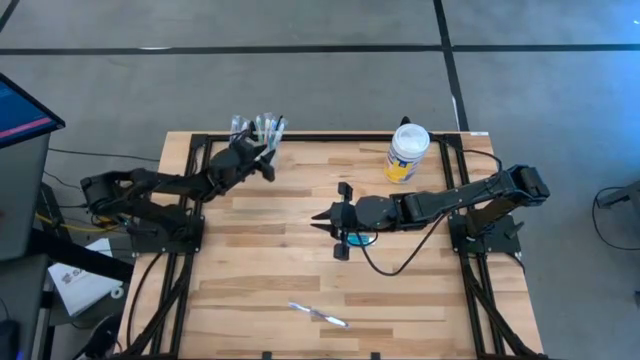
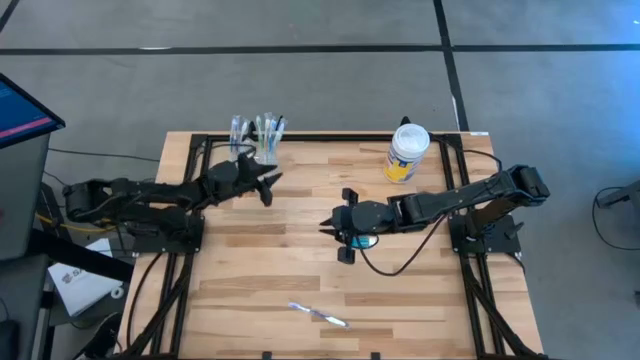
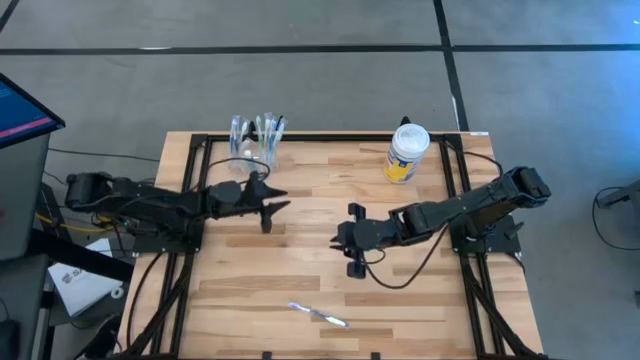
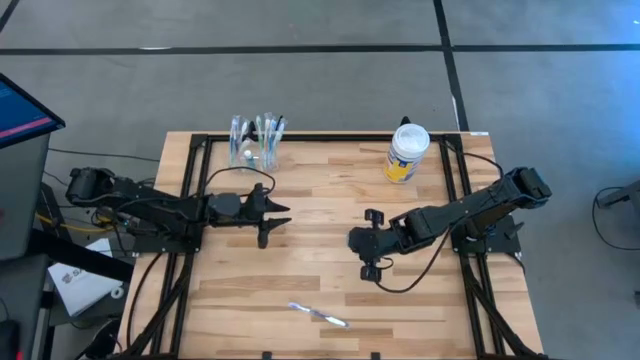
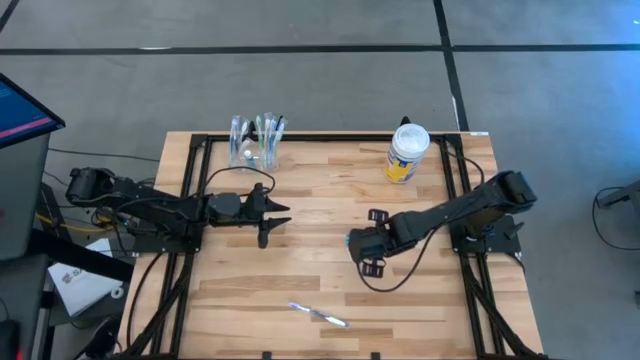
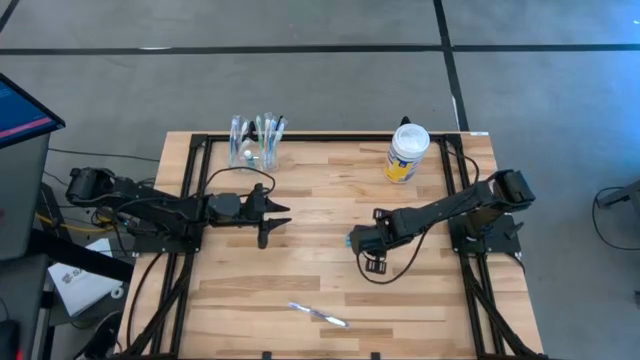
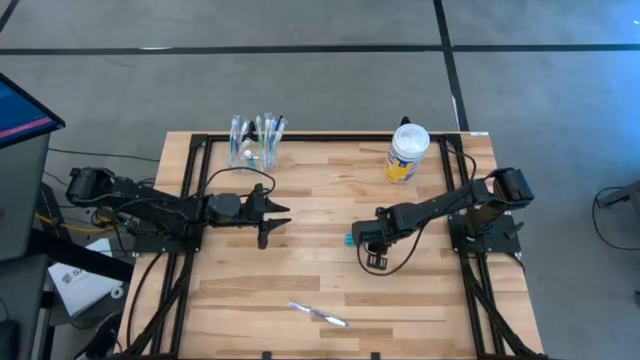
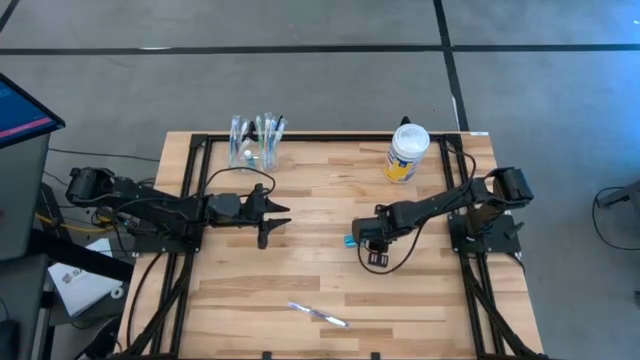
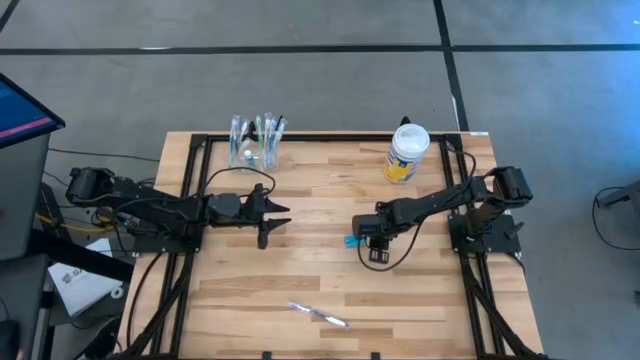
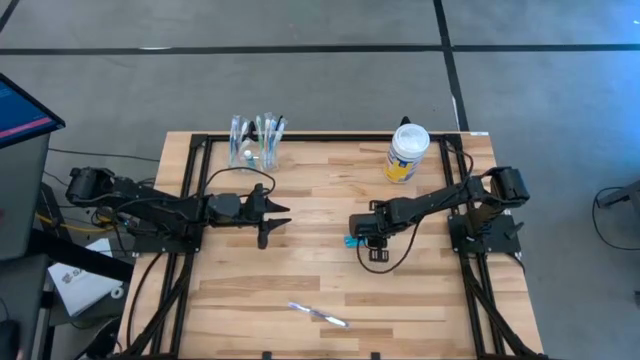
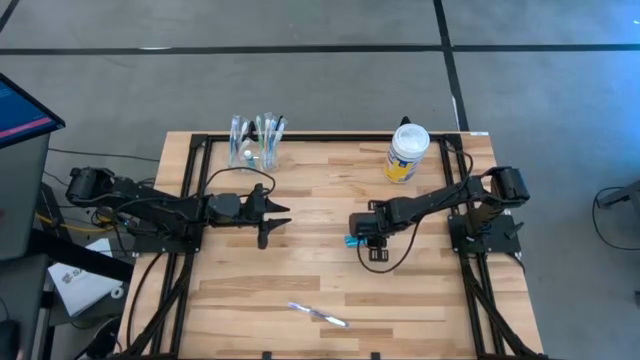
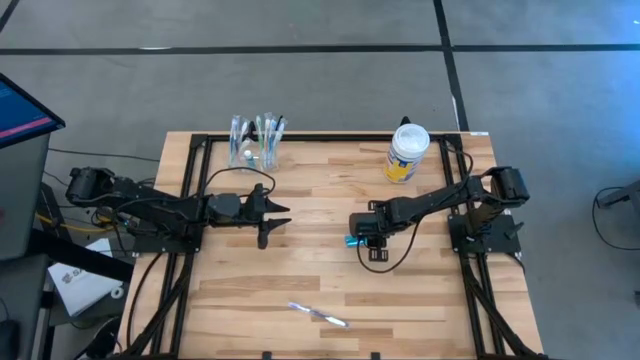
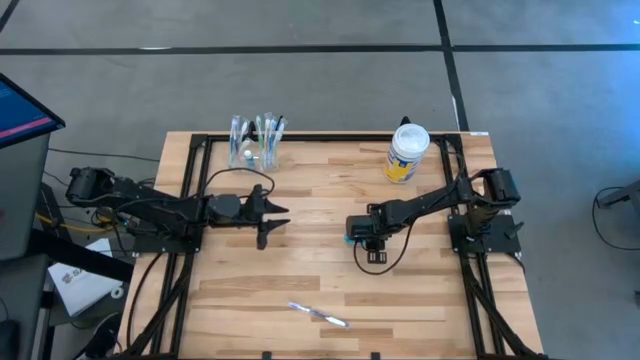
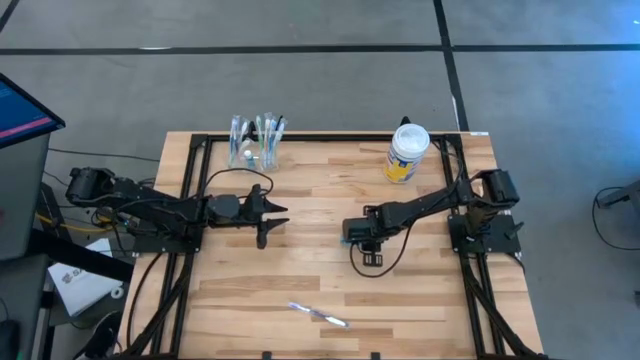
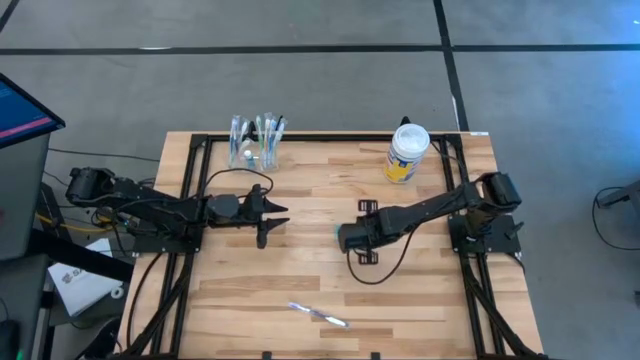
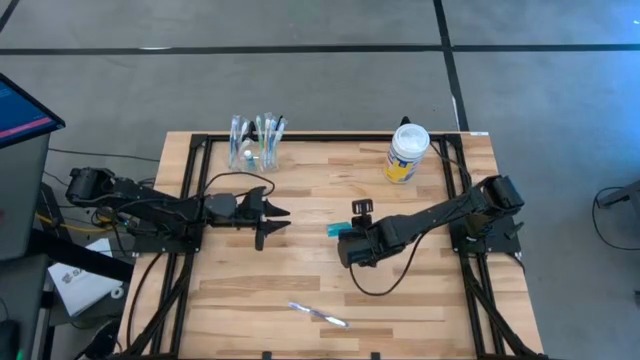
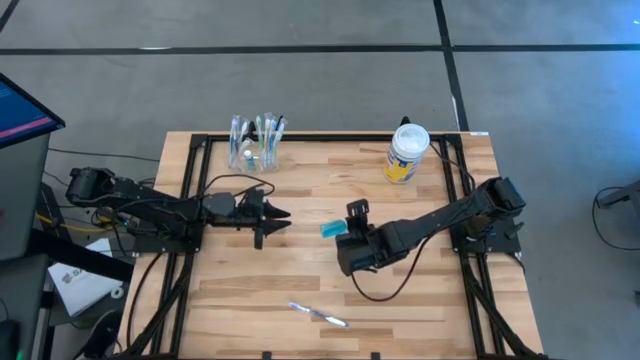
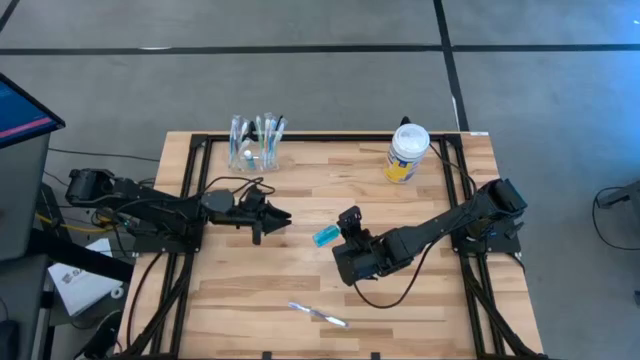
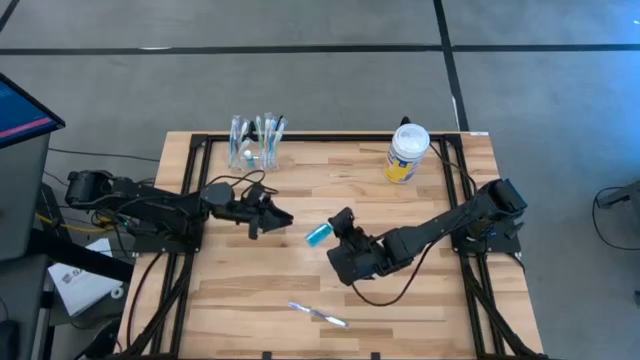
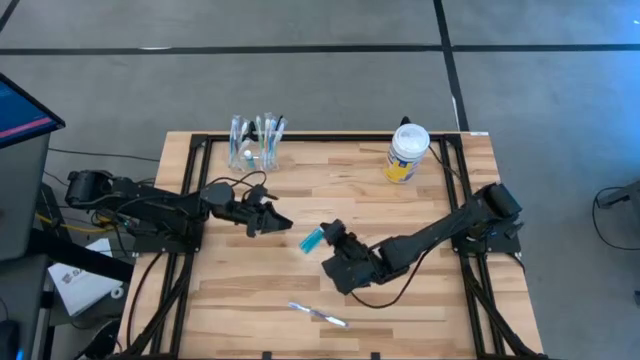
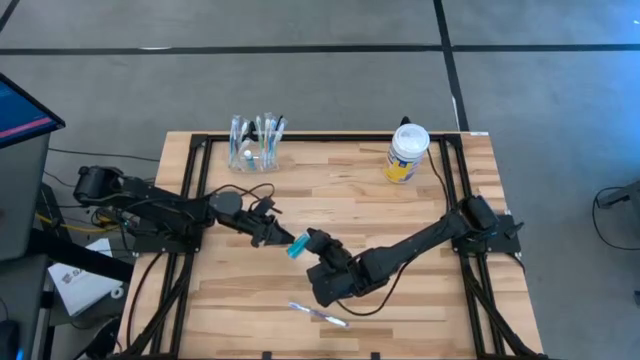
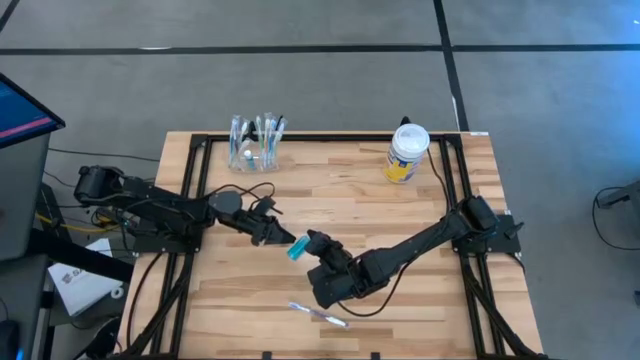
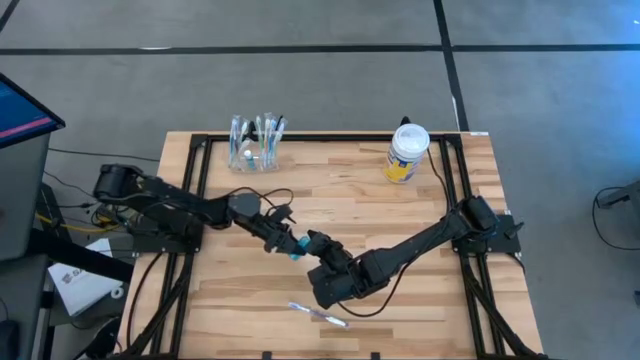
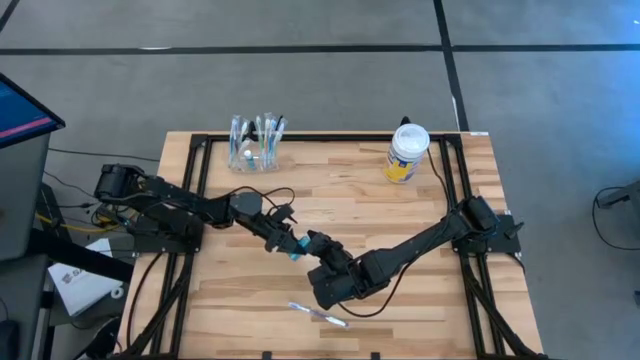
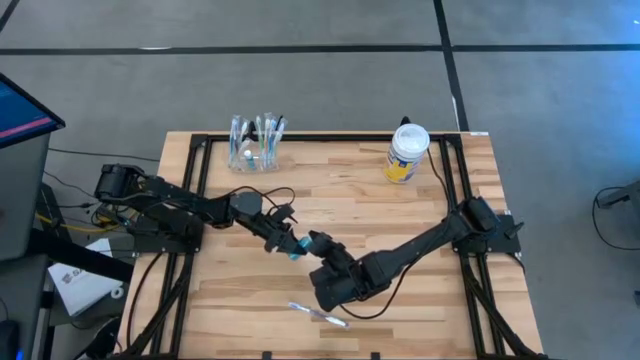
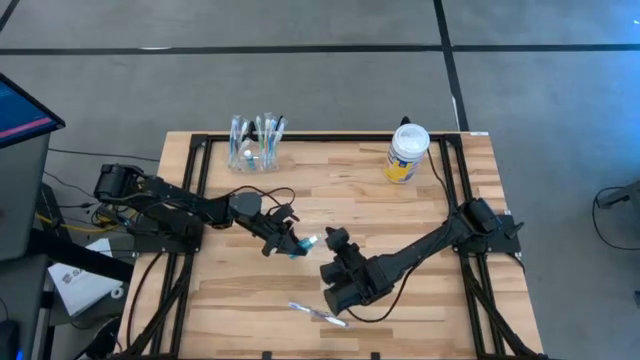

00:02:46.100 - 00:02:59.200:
Task: Pick & Place toothbrushing station
Put the blue mouthwash into the transparent organizer
